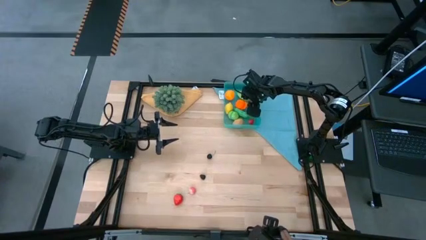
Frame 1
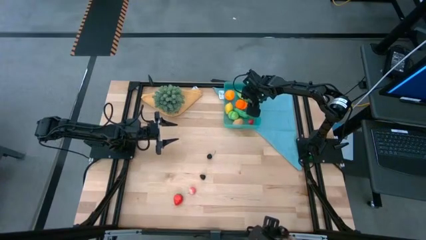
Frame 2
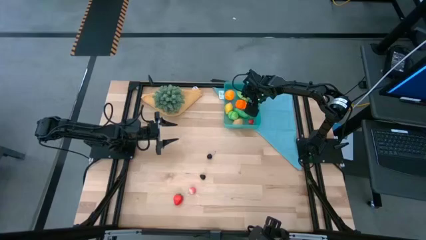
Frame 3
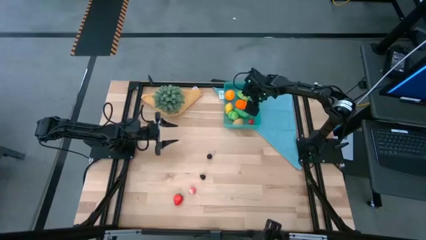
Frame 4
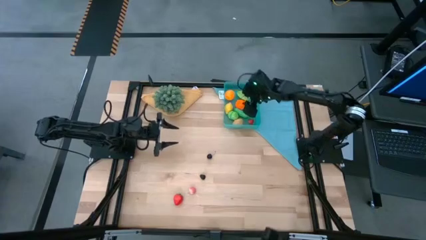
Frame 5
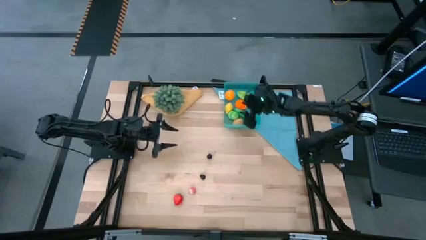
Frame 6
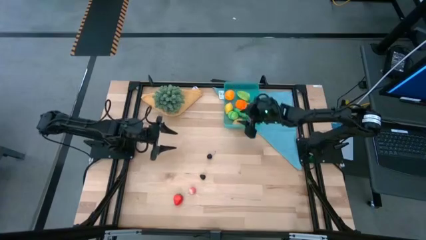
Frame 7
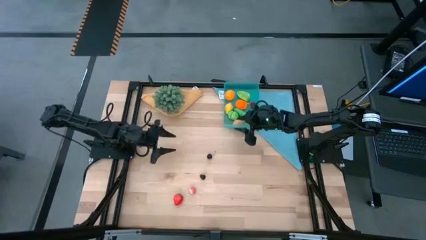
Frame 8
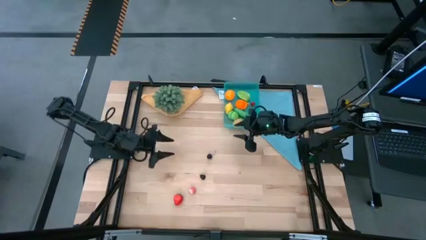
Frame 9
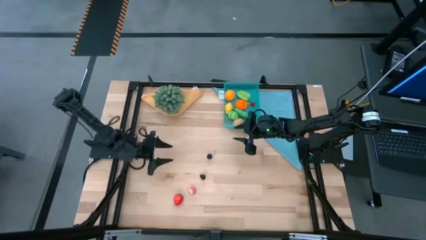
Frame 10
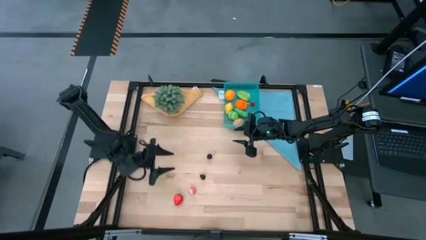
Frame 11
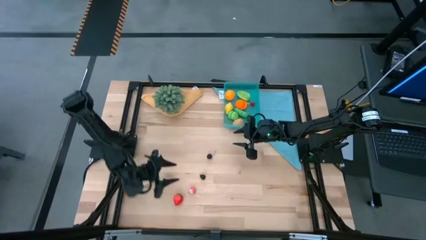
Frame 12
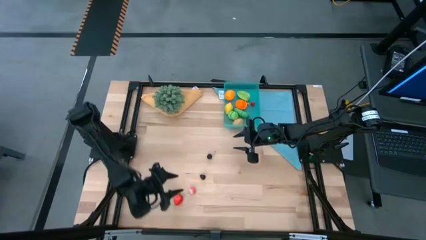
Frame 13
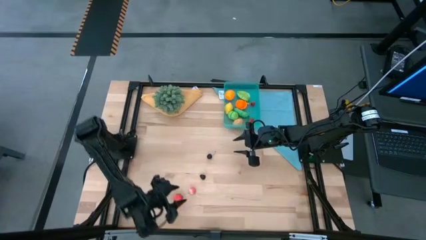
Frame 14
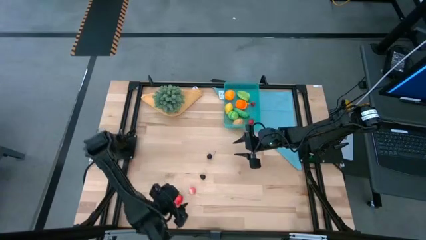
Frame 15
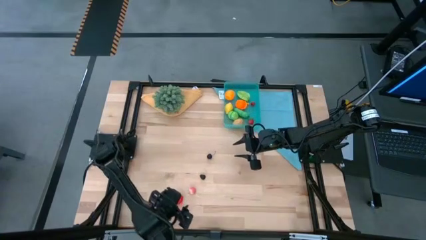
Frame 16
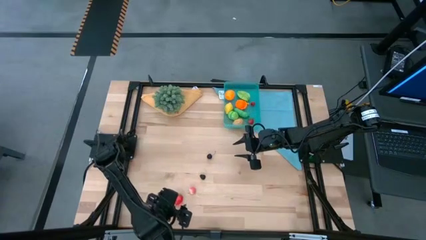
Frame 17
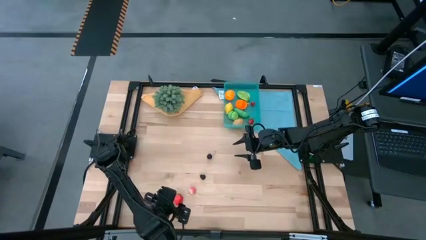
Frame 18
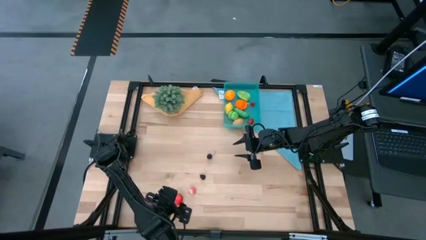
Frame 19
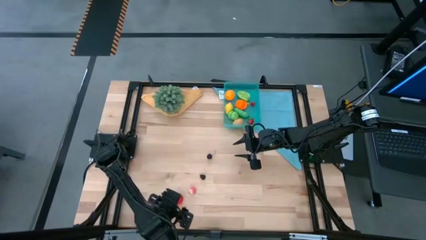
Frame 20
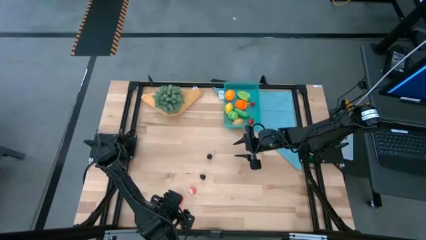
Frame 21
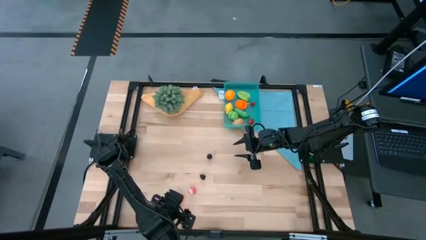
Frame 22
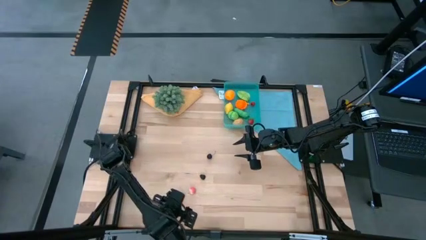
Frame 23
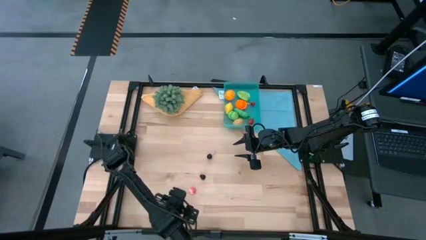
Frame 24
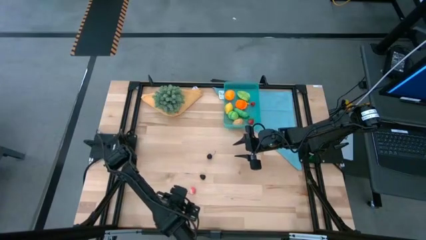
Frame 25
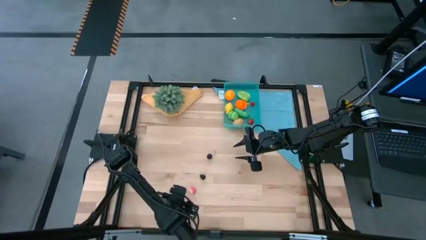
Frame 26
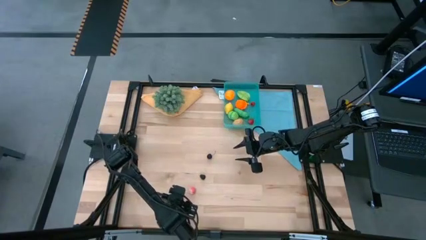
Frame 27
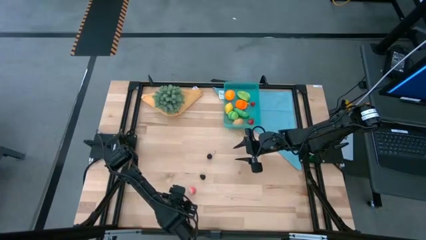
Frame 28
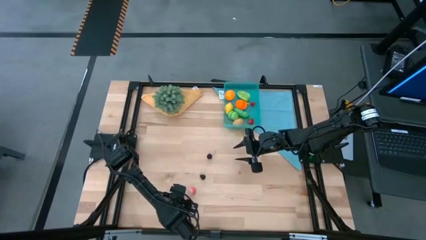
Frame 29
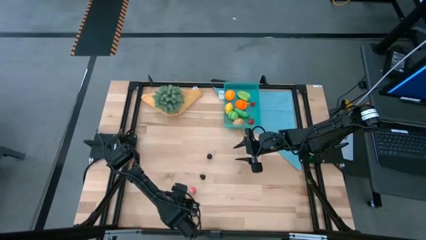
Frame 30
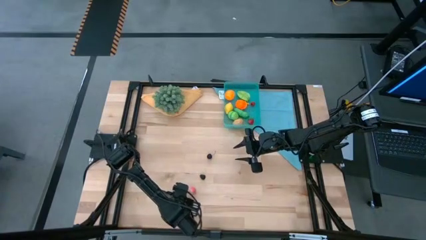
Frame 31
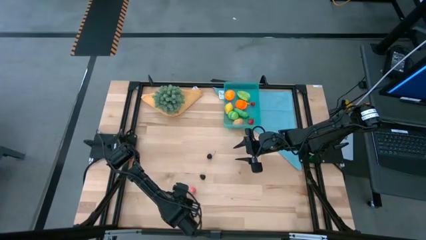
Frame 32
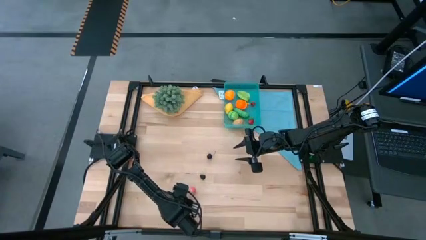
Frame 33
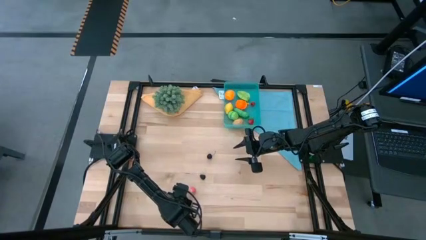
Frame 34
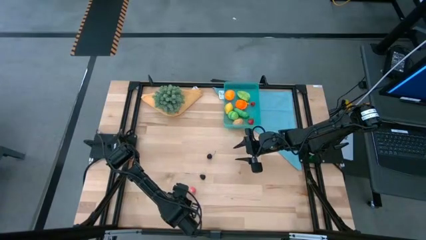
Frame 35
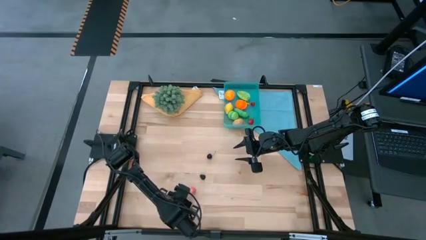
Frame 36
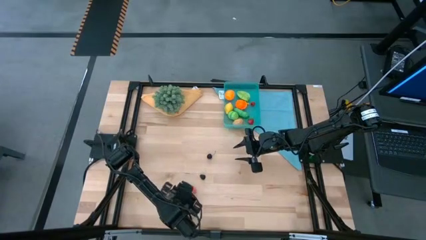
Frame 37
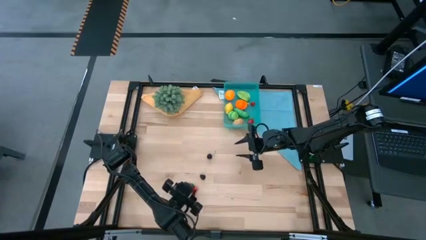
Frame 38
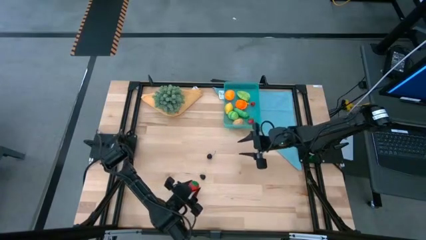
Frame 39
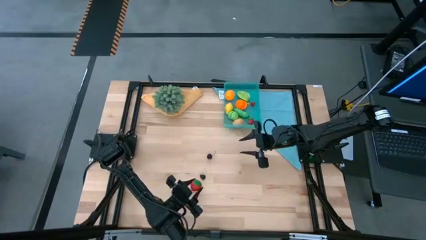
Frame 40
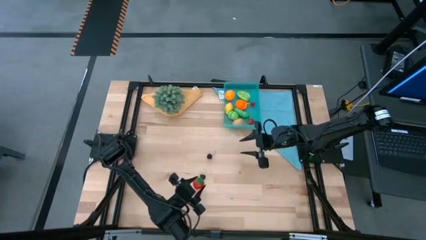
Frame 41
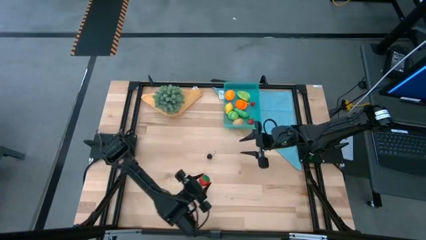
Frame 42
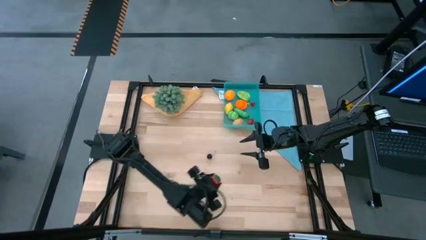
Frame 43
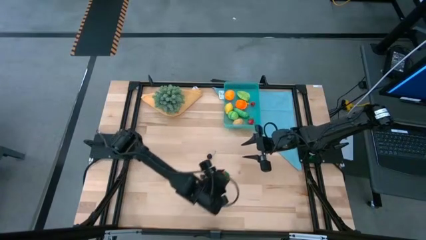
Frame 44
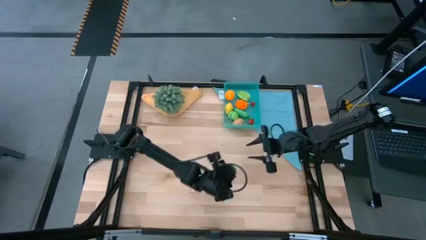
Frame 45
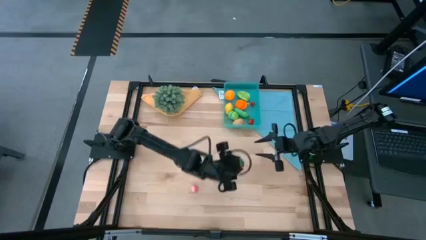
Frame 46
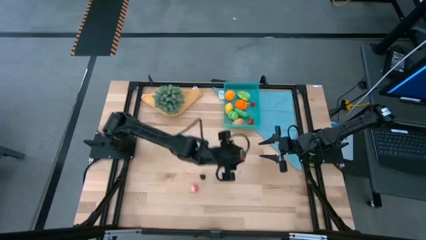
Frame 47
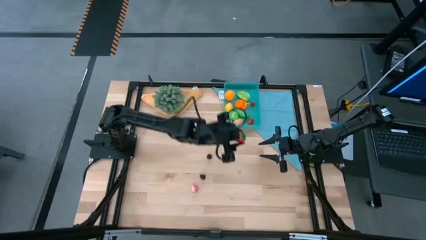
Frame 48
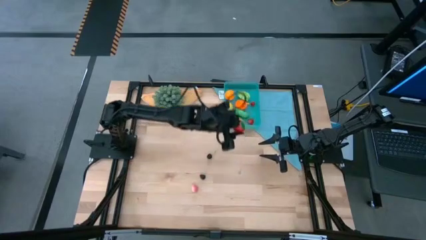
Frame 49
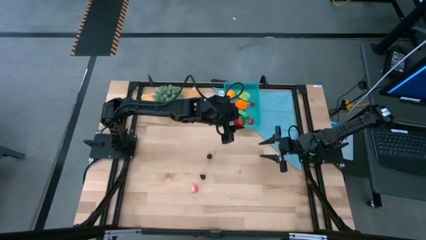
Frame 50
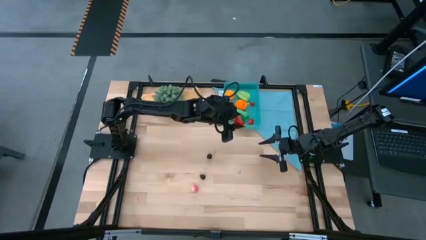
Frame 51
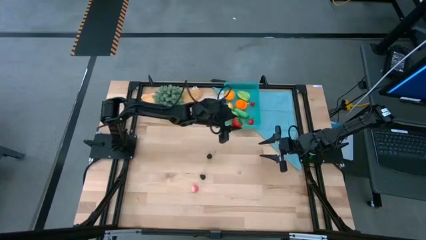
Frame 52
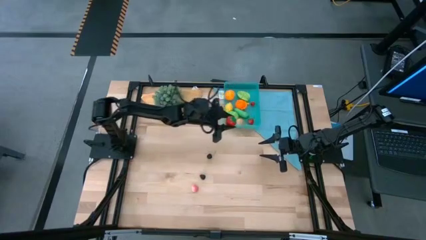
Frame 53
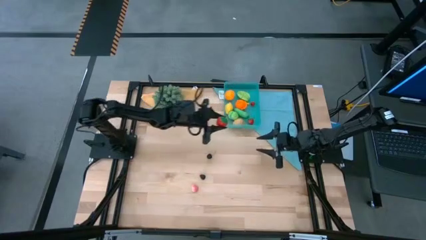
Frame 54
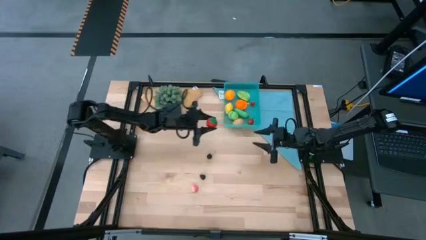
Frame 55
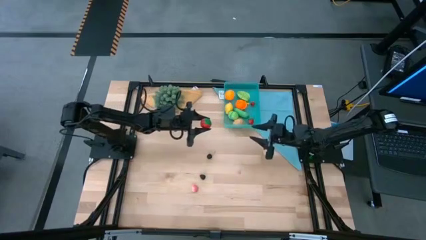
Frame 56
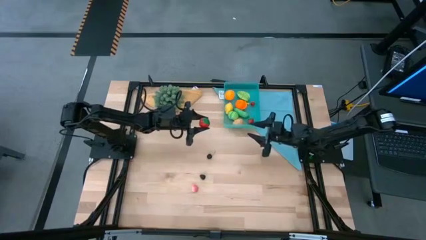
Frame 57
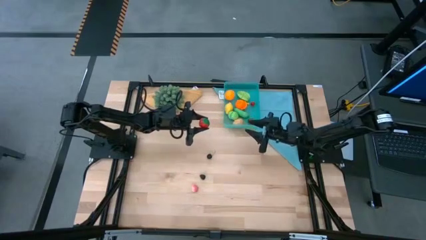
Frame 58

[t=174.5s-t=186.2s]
Task: Pick and placing Produce into tupperware
Put the red strawberry into the blue bin

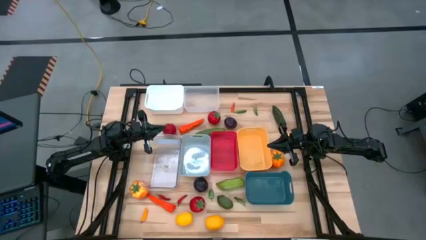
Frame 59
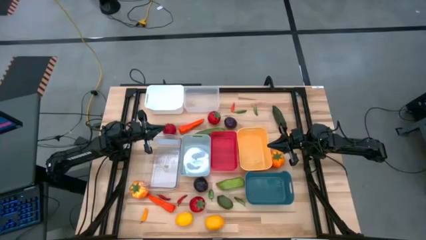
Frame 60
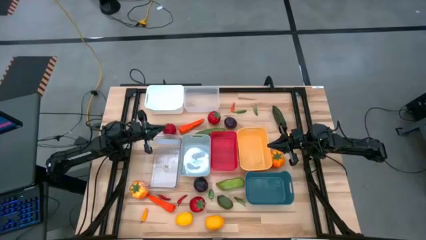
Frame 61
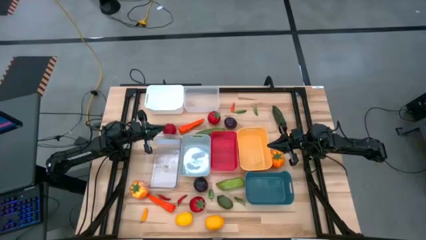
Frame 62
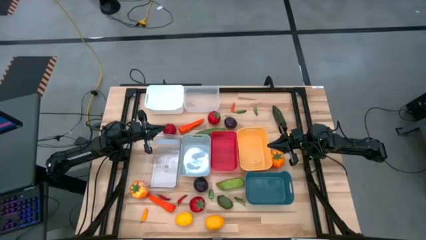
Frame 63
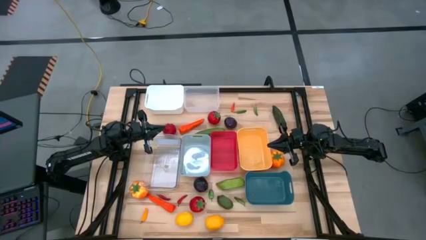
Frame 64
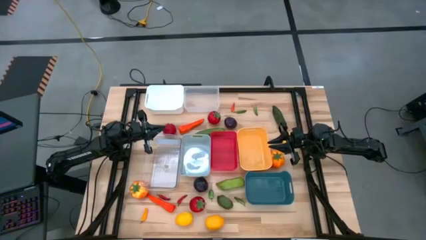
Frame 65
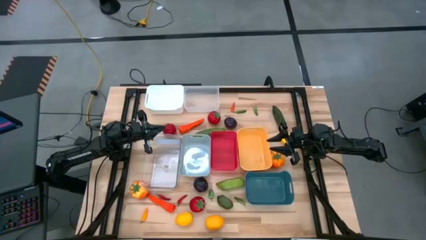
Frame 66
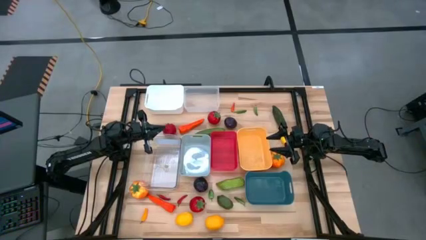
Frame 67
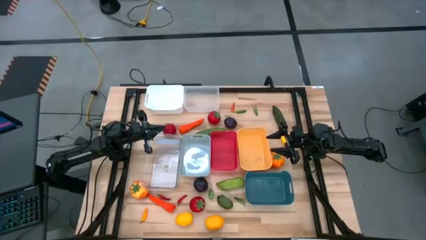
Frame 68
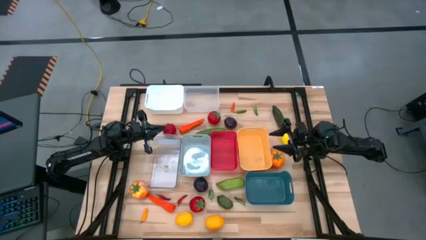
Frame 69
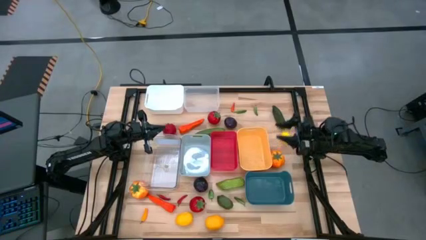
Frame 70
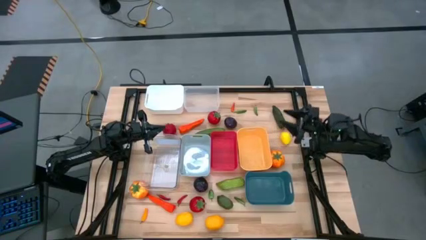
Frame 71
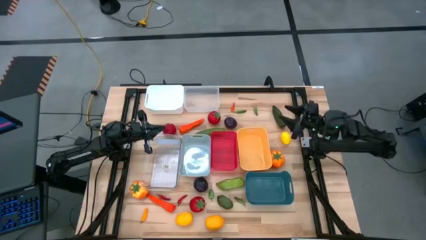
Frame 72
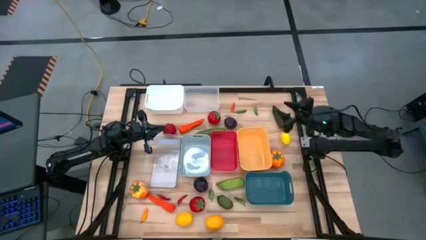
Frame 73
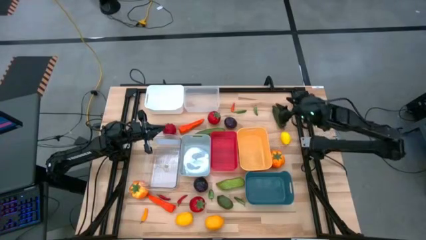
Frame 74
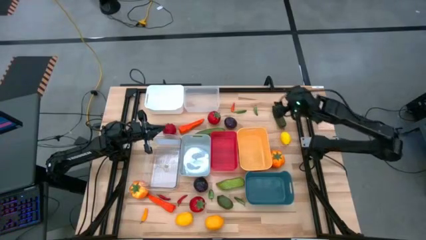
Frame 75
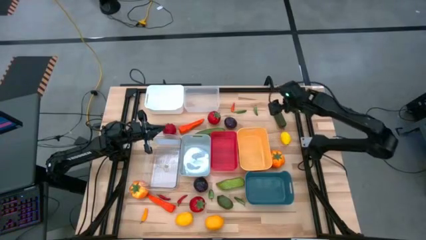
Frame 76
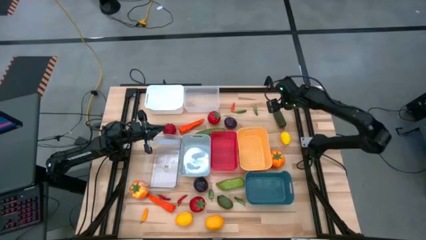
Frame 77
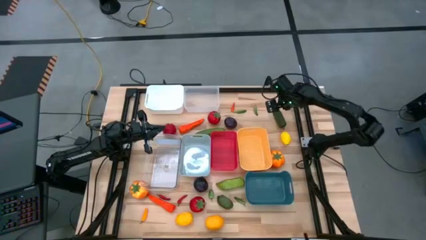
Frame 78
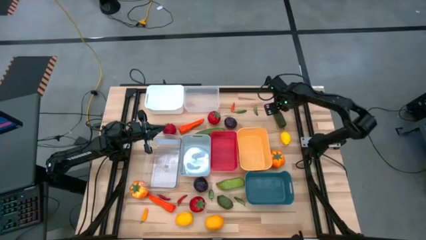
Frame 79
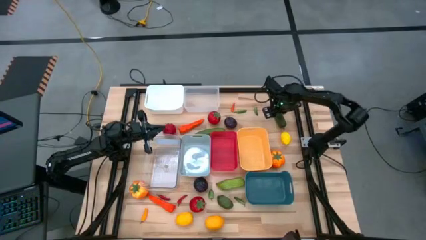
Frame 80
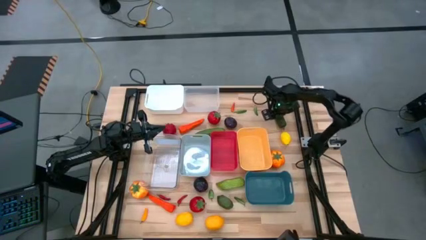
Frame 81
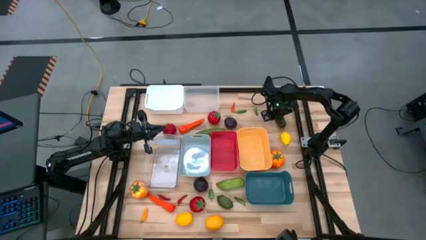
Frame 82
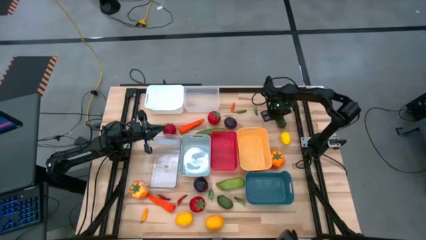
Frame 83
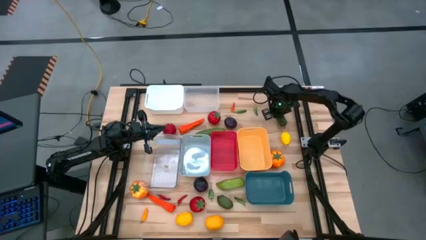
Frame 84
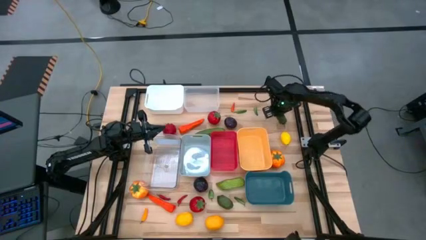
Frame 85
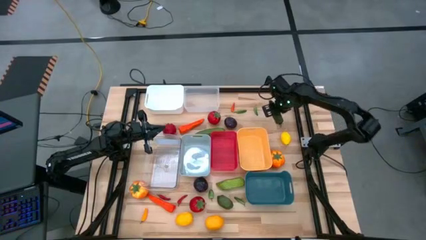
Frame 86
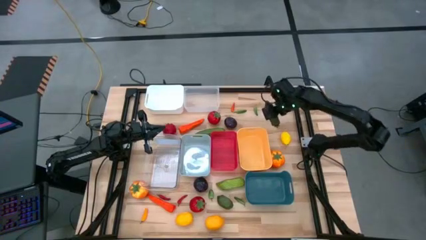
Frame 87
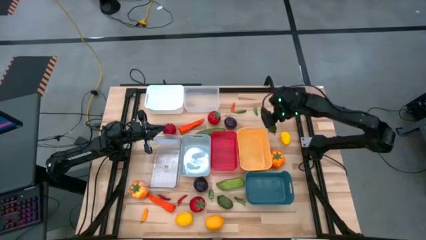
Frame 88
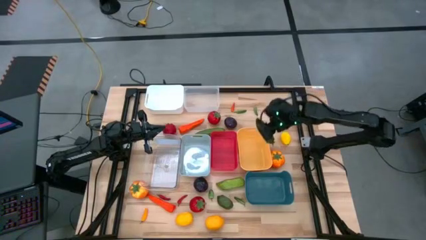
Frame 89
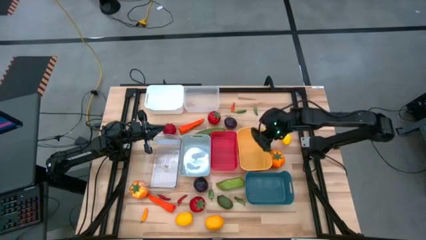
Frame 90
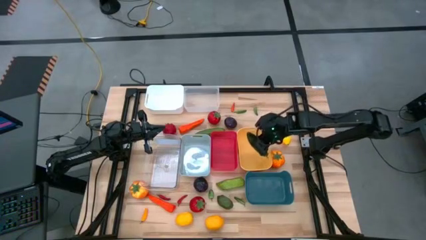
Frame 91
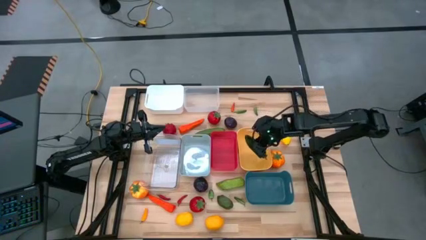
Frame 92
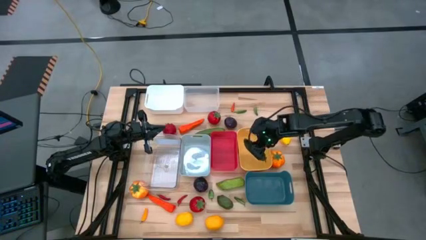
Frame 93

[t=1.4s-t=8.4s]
Task: Sort produce into baskets
Put the green chili pepper into the yellow bin
